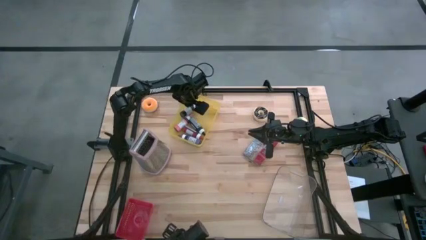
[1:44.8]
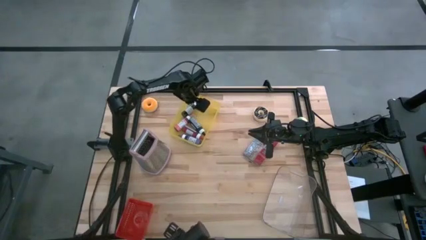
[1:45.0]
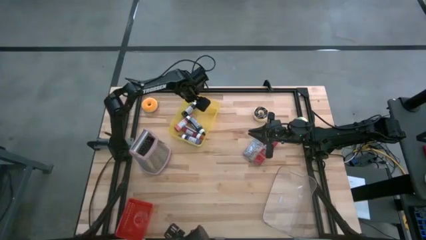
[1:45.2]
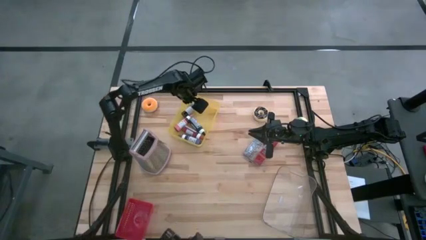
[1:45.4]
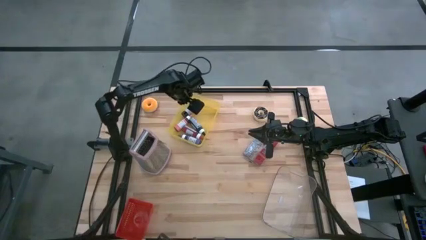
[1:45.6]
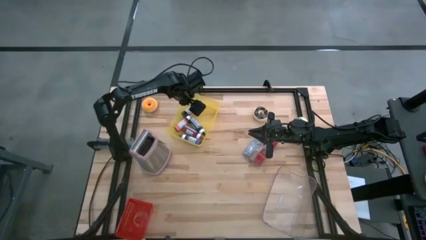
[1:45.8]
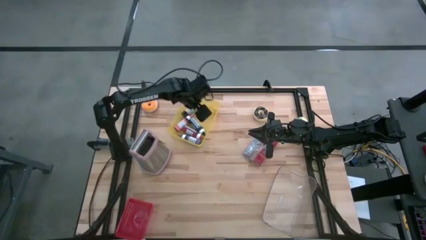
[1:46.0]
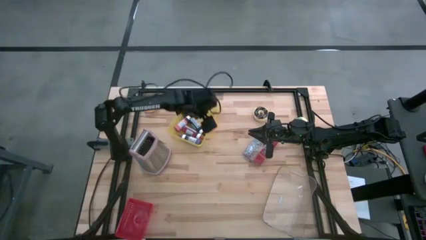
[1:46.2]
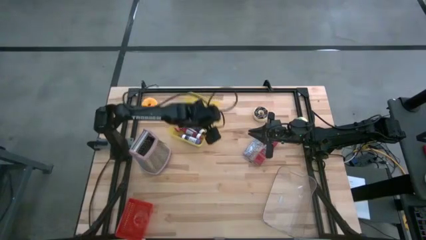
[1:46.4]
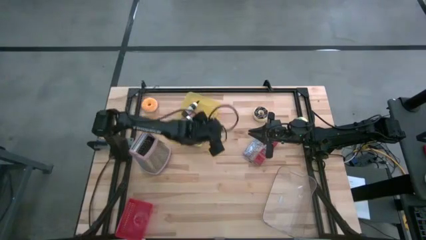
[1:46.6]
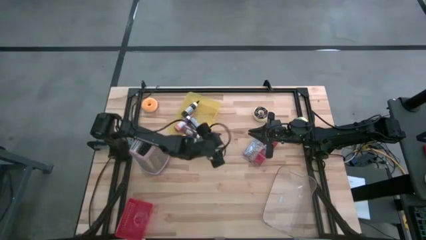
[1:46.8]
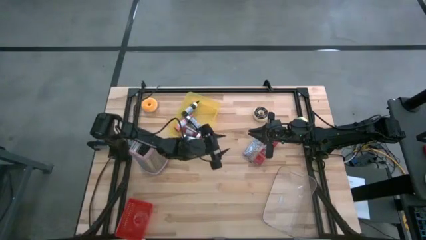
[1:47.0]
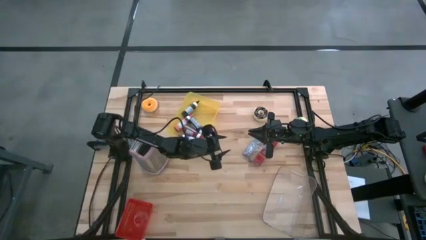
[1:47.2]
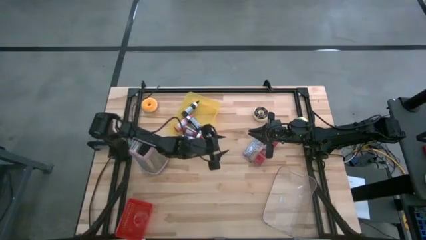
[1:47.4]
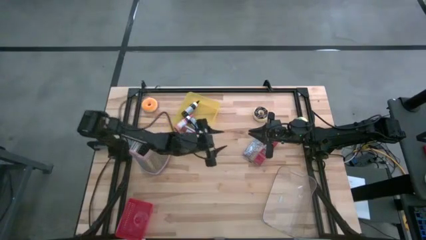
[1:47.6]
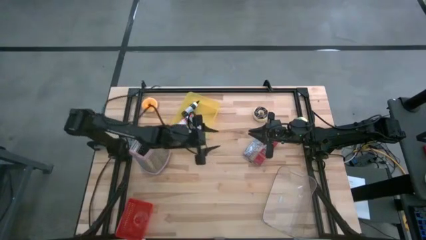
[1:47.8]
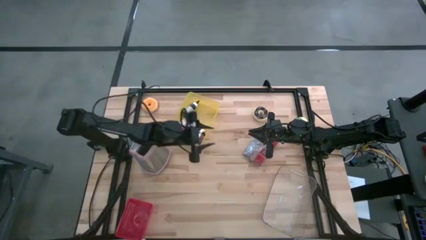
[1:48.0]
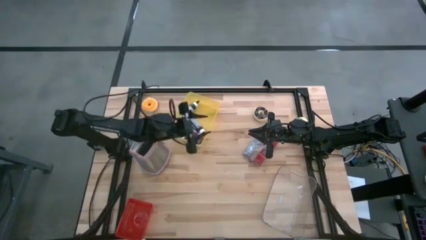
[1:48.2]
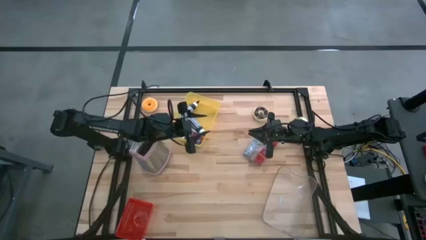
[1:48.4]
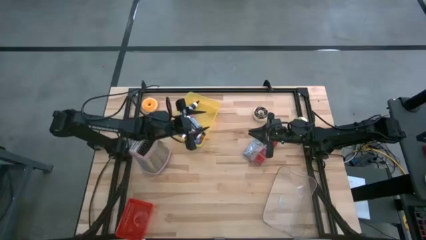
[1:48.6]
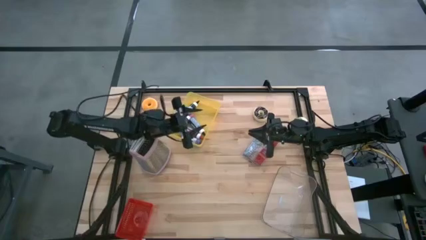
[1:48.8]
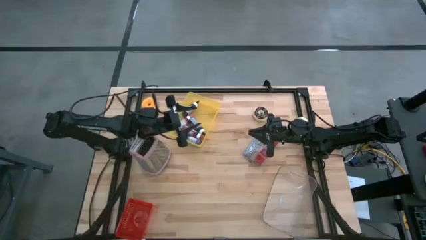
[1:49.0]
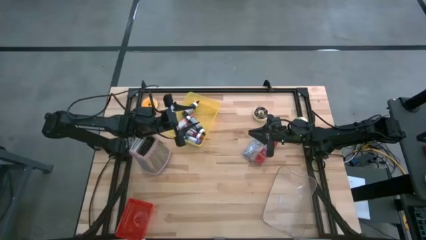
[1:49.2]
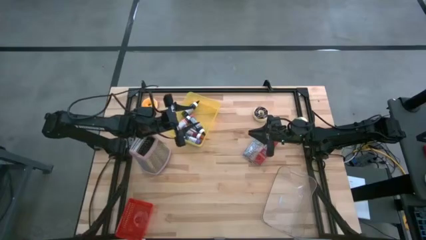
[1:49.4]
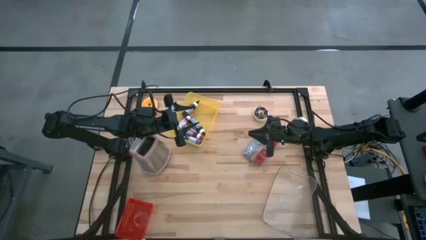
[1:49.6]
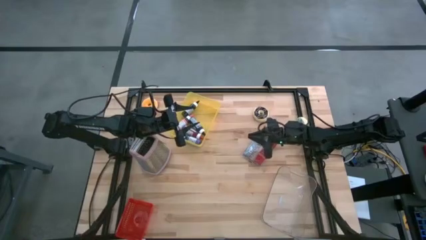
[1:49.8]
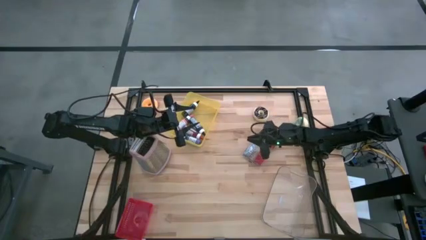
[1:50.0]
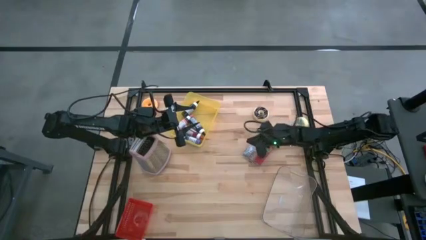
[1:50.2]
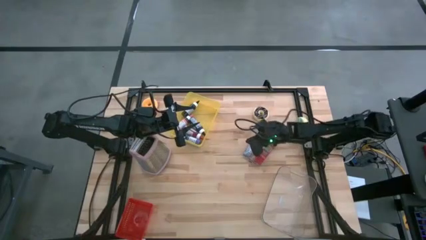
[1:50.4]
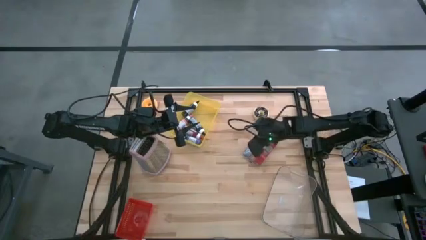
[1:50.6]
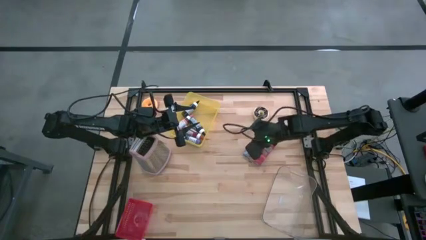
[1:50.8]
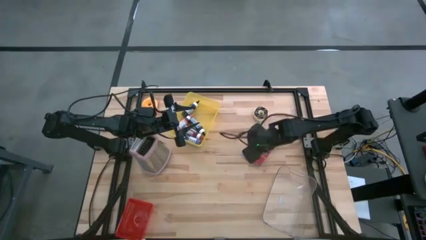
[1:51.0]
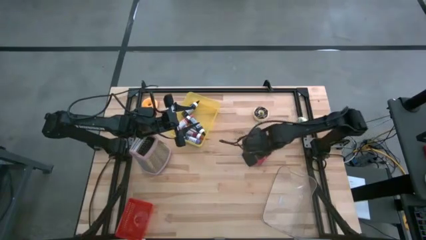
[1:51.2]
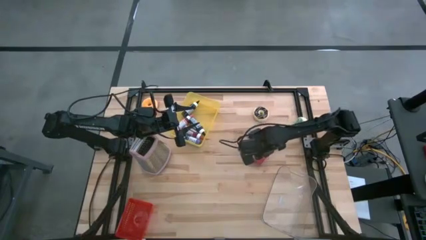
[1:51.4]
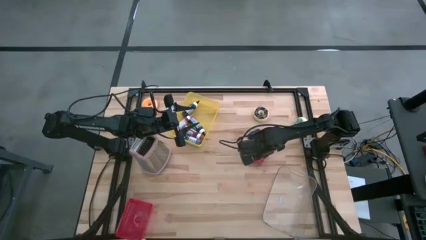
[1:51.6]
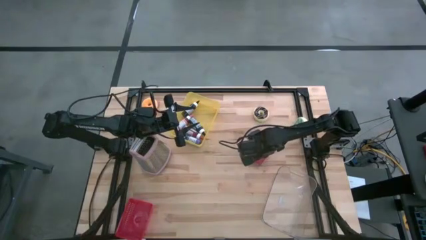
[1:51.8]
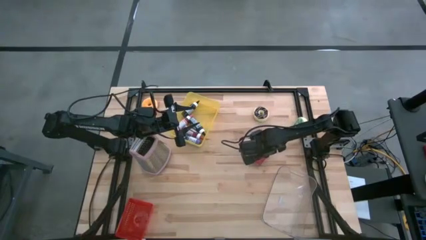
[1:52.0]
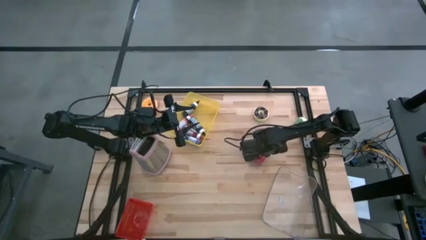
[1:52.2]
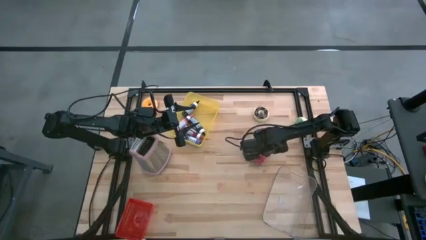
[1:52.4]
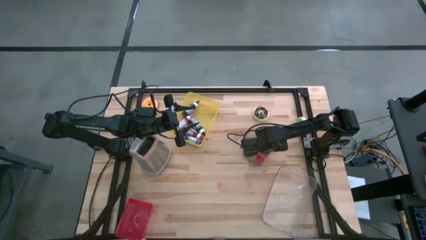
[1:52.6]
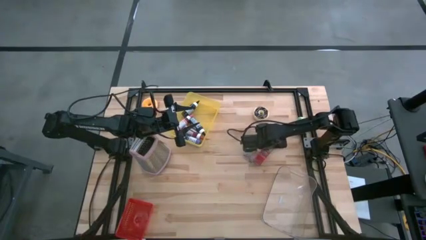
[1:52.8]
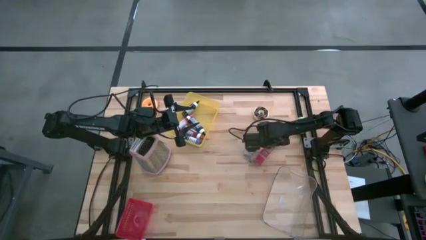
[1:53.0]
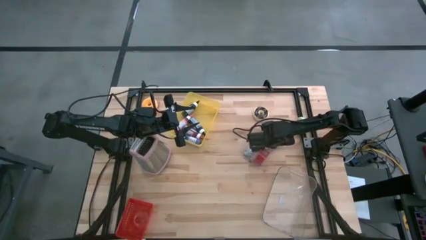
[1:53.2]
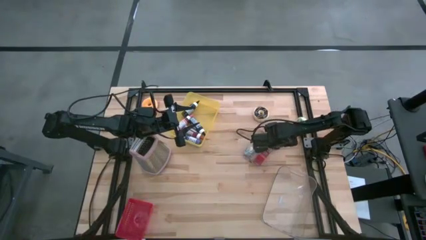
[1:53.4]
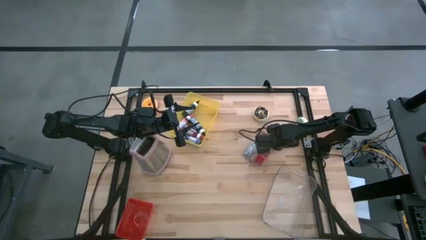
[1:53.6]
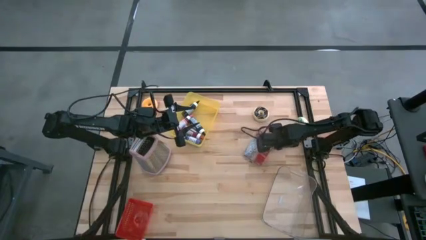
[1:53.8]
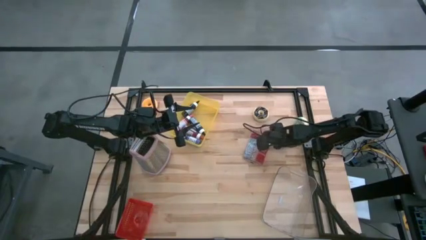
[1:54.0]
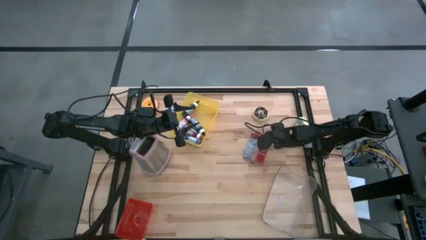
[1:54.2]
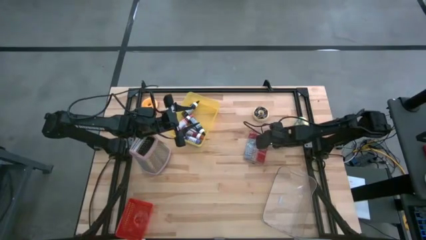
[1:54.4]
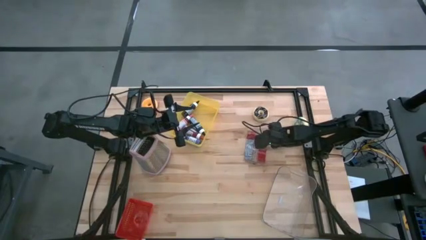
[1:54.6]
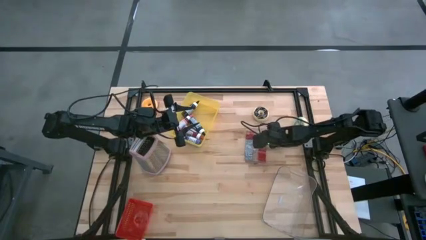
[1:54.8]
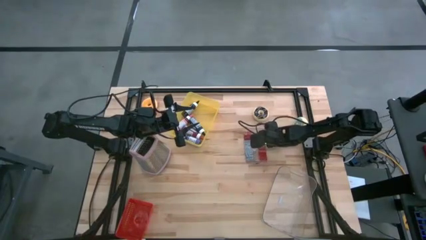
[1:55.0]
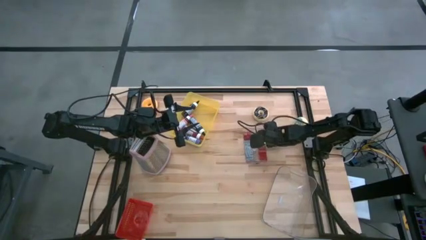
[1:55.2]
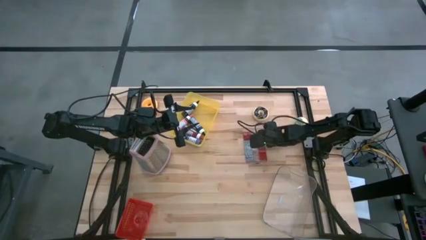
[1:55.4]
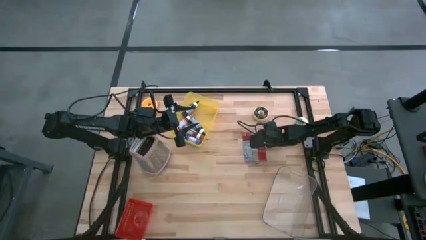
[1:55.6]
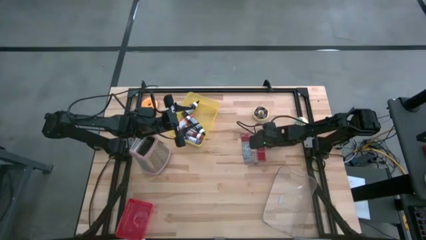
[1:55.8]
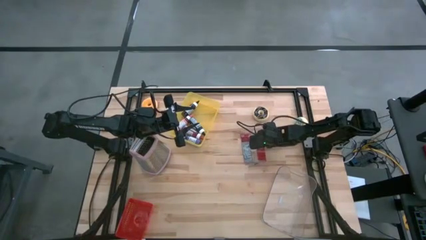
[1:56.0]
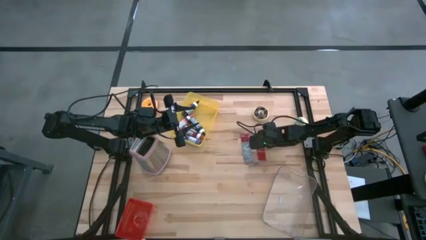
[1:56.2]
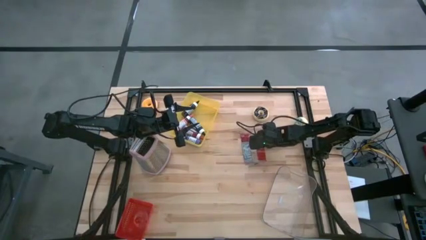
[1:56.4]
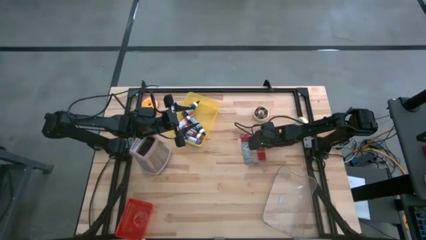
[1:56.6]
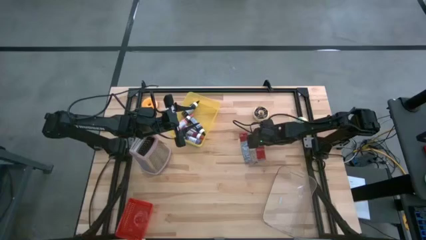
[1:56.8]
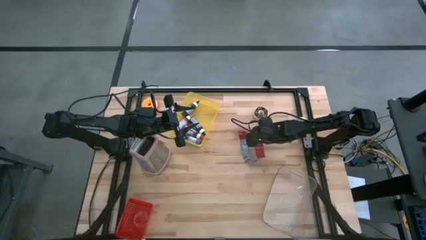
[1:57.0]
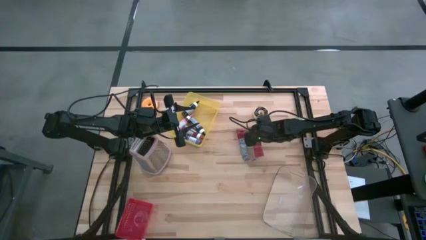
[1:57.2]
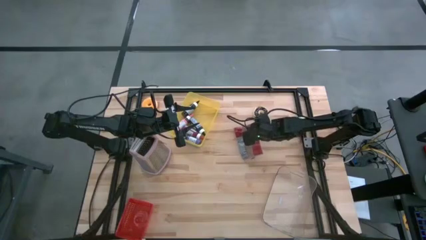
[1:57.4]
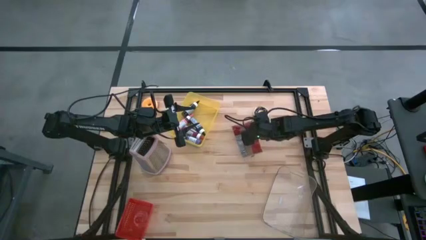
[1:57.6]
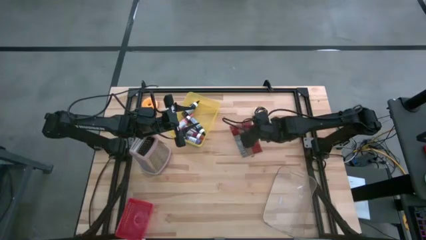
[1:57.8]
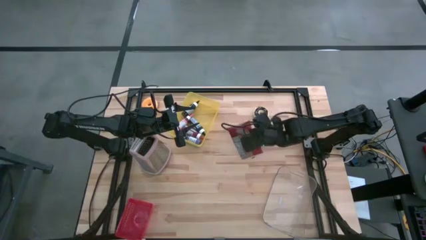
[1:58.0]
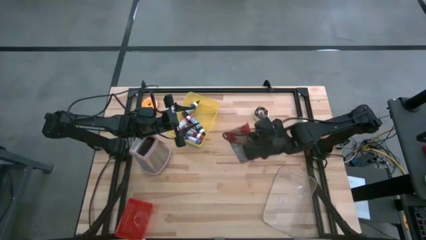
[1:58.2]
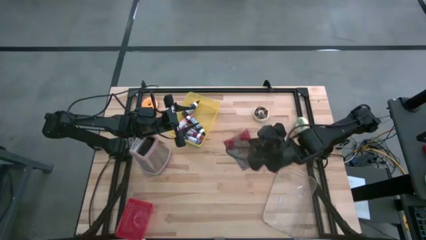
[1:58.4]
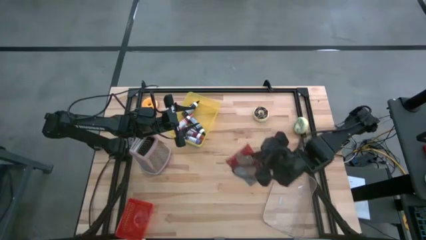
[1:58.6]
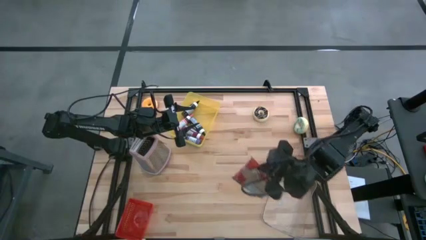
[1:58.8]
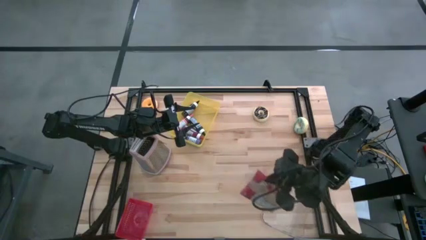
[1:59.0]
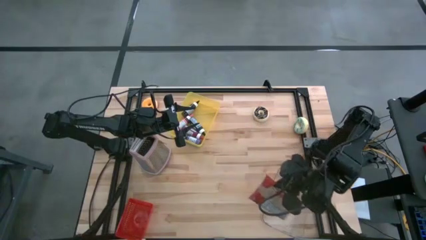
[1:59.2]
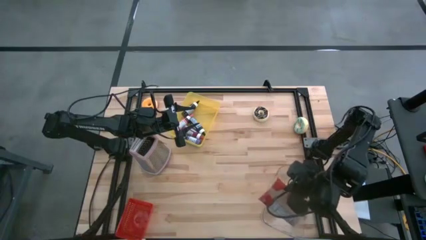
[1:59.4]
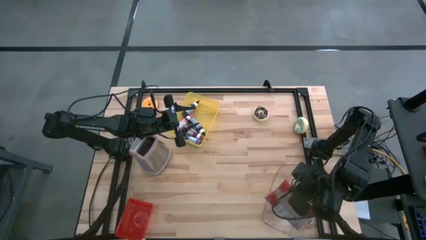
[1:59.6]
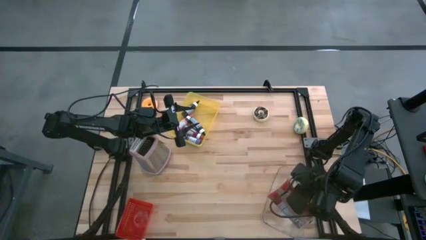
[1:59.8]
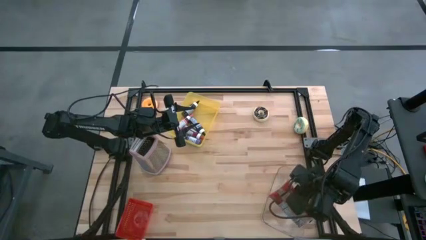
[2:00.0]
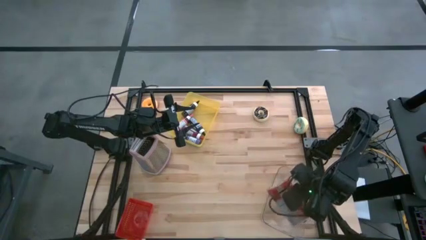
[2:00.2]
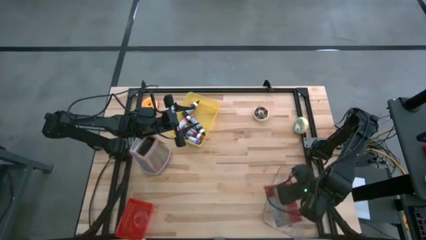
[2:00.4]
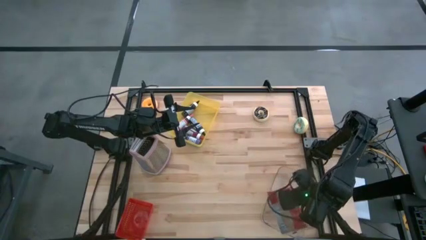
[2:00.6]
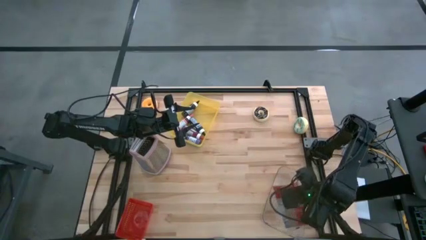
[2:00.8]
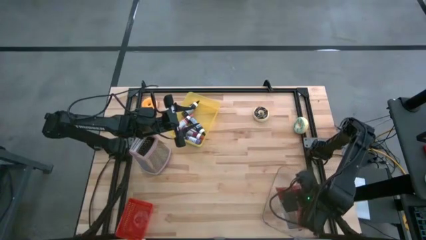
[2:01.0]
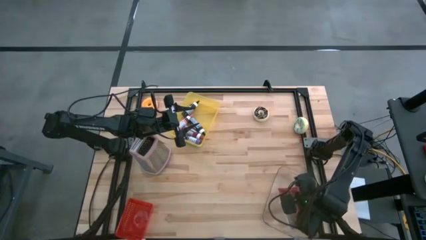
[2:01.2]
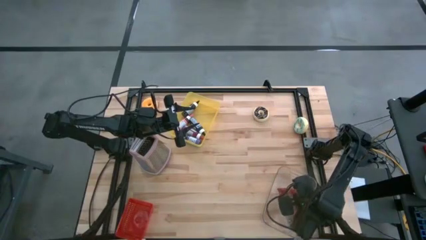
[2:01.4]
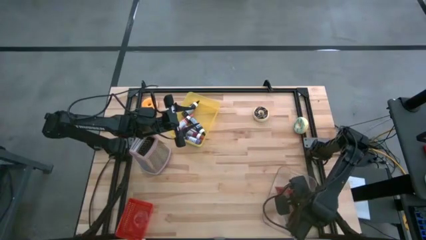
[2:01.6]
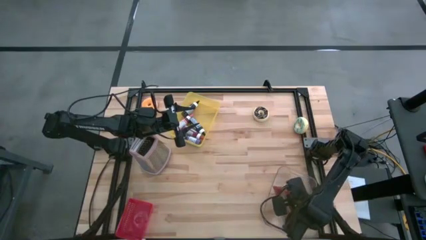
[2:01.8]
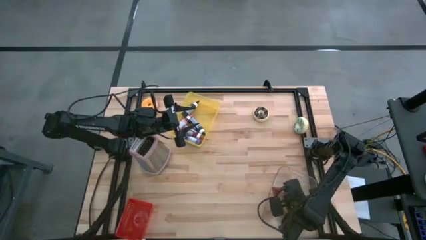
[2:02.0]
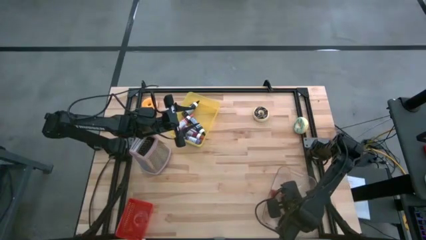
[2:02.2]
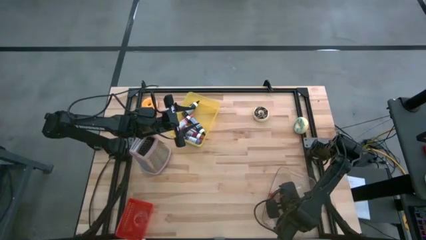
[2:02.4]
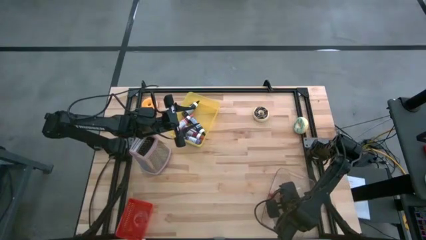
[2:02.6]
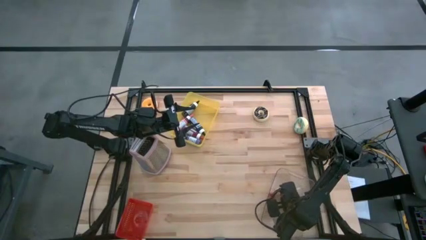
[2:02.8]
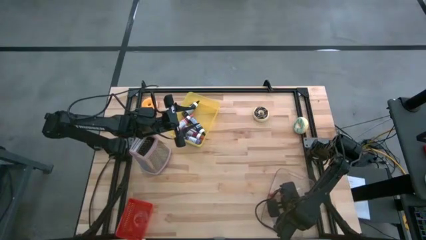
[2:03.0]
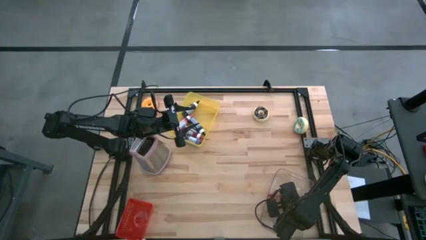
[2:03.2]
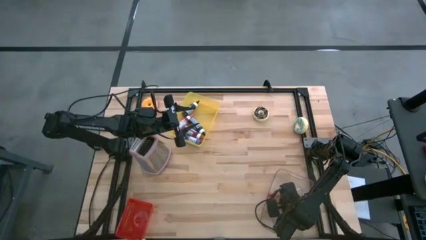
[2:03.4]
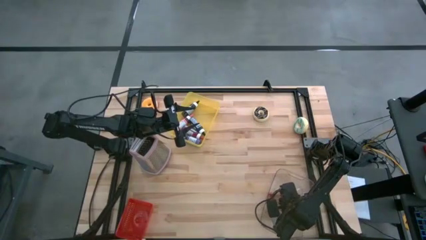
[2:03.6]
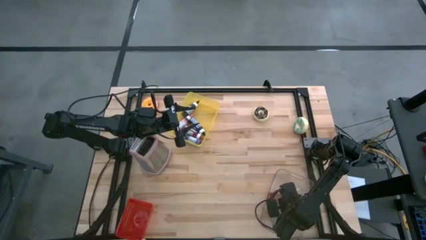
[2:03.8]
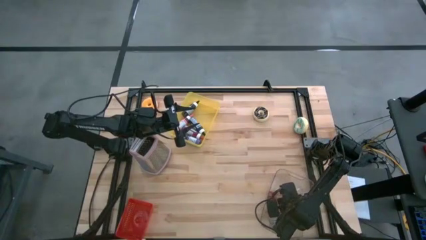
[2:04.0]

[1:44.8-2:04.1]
Task: Pick & Place Food Item
Put the red popcorn bag into the transparent bin
